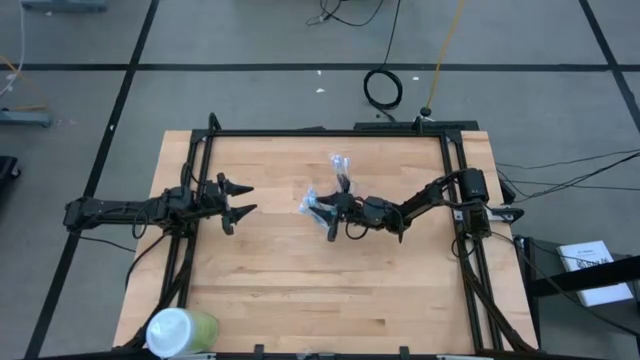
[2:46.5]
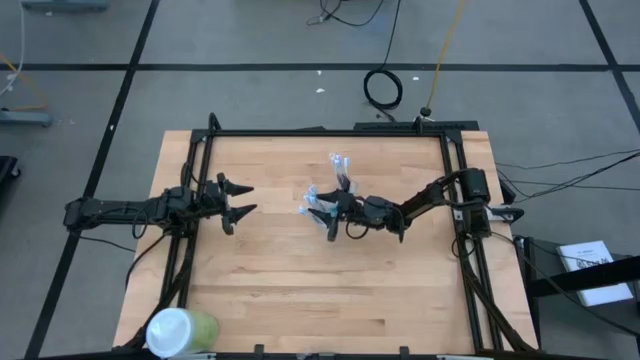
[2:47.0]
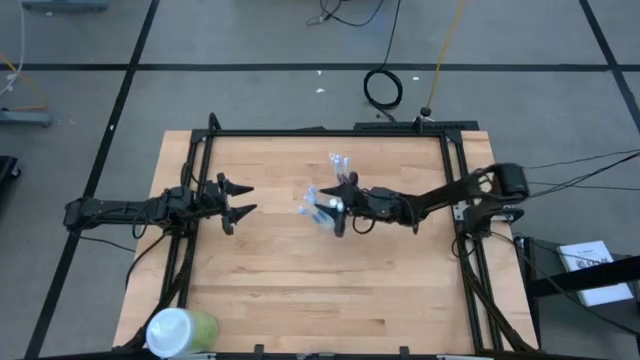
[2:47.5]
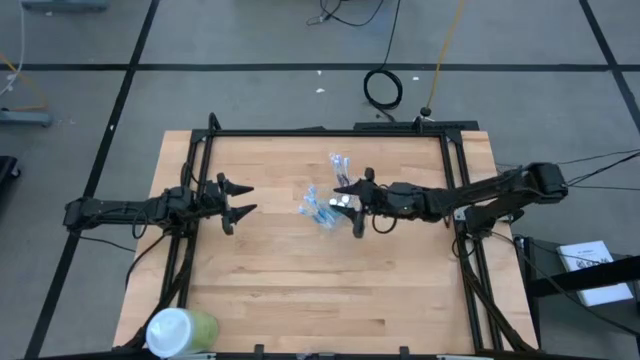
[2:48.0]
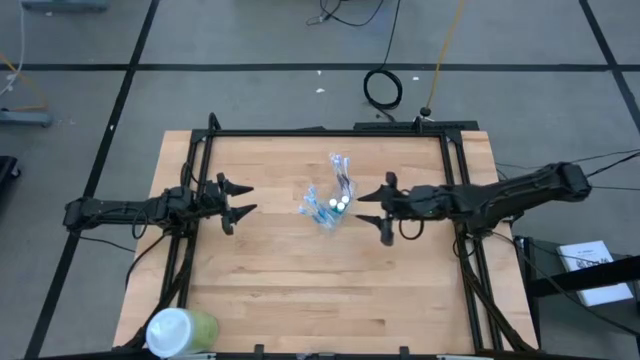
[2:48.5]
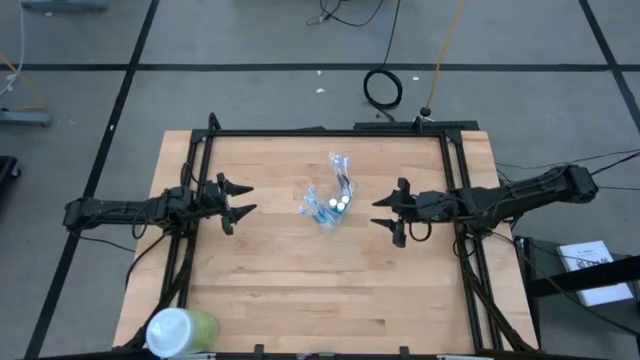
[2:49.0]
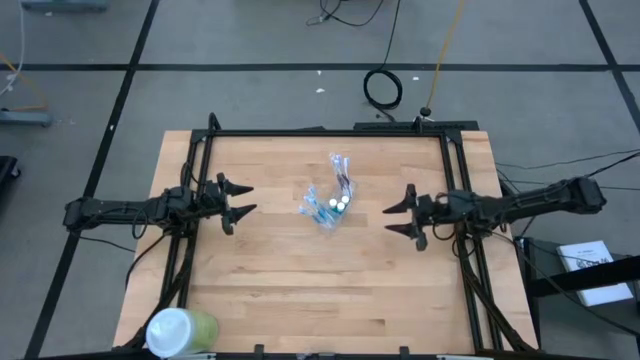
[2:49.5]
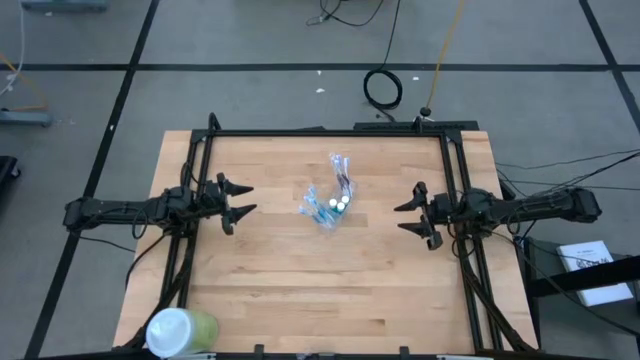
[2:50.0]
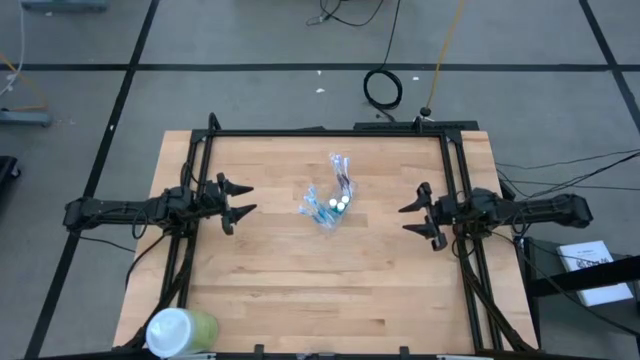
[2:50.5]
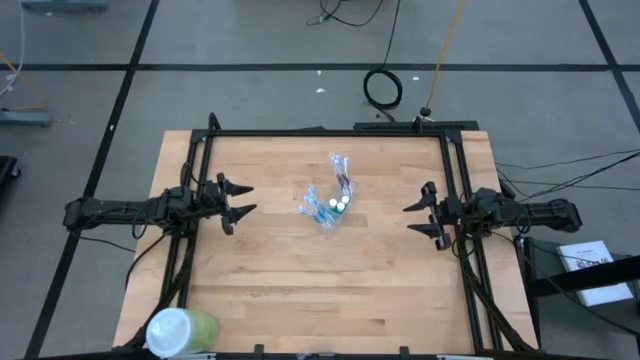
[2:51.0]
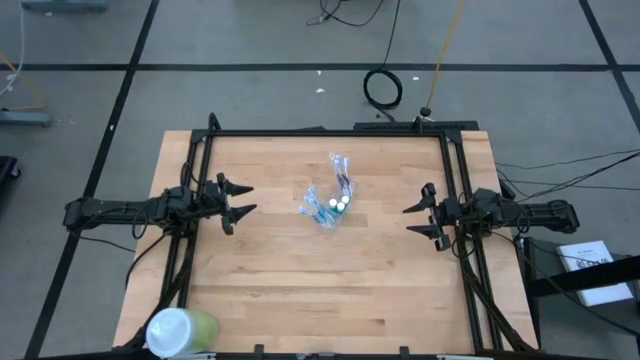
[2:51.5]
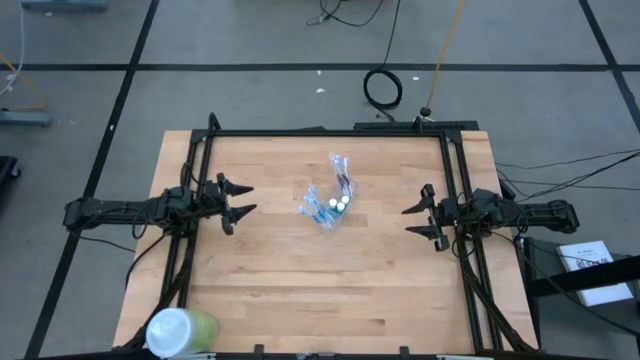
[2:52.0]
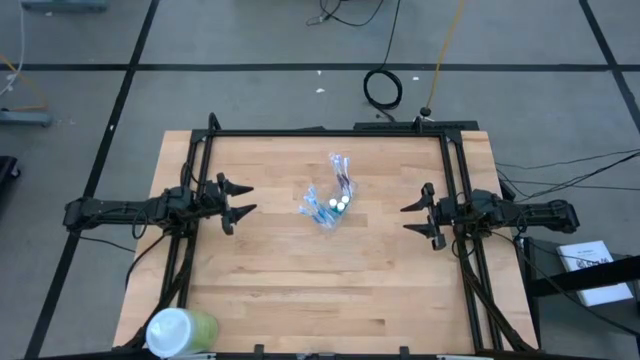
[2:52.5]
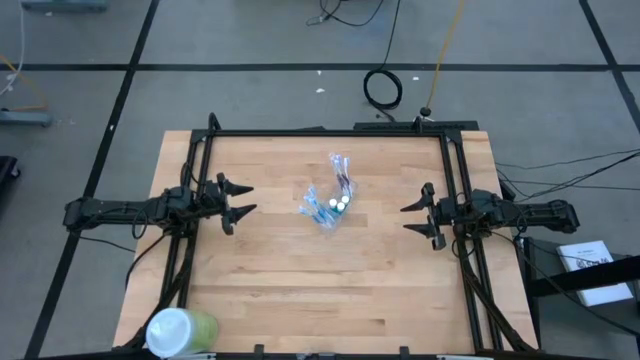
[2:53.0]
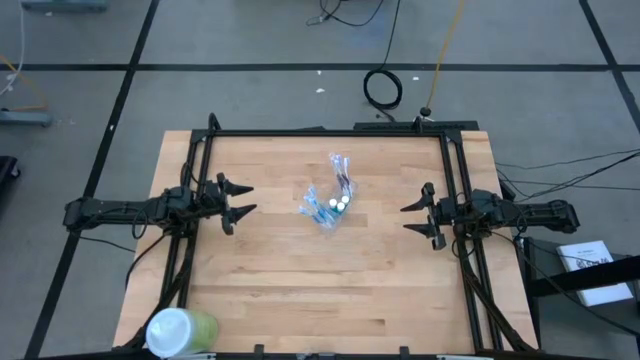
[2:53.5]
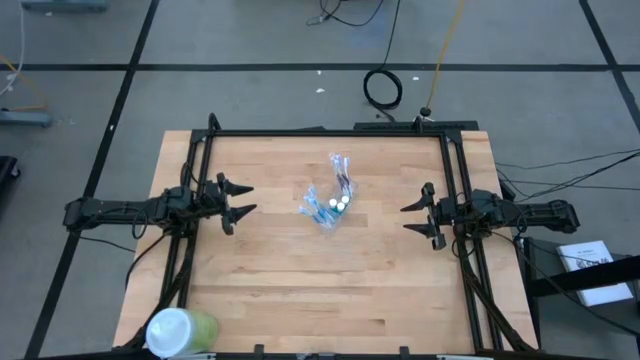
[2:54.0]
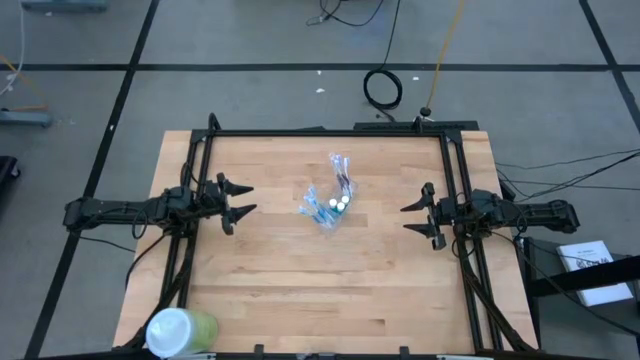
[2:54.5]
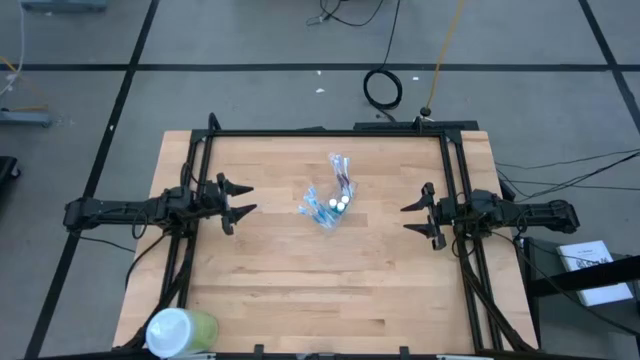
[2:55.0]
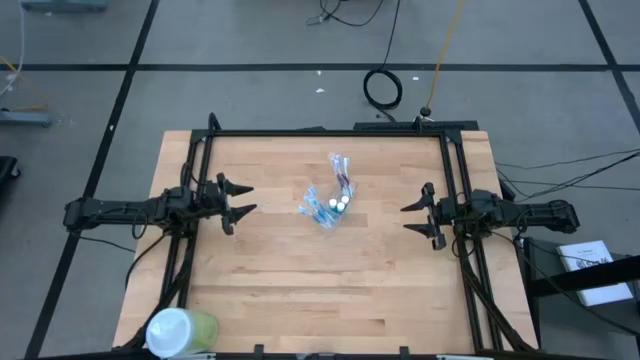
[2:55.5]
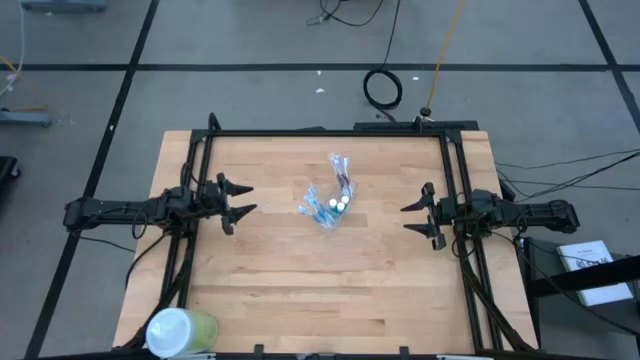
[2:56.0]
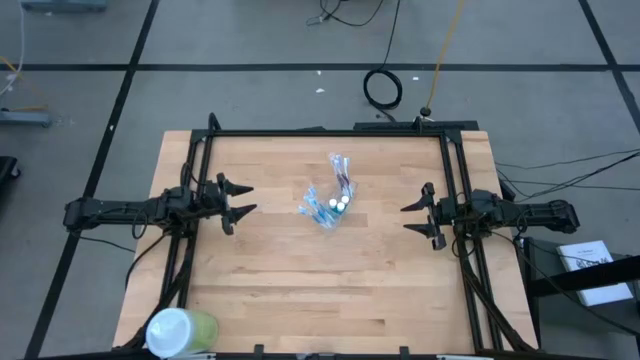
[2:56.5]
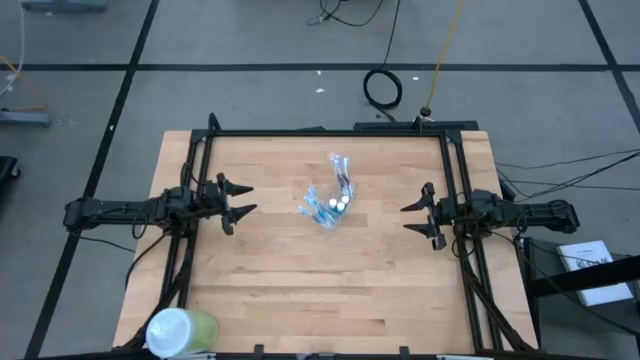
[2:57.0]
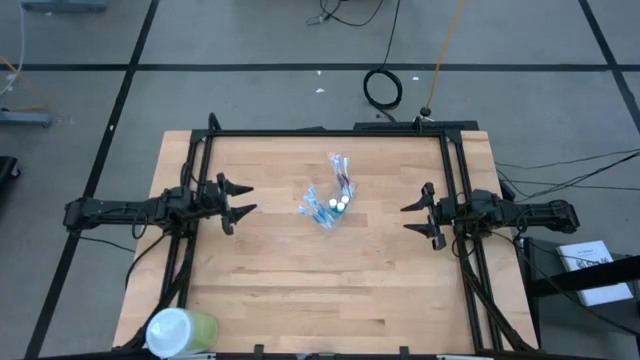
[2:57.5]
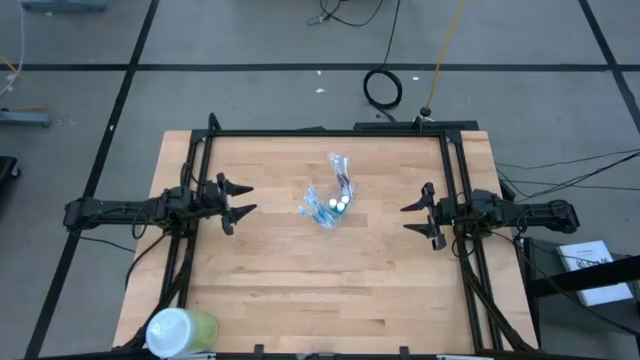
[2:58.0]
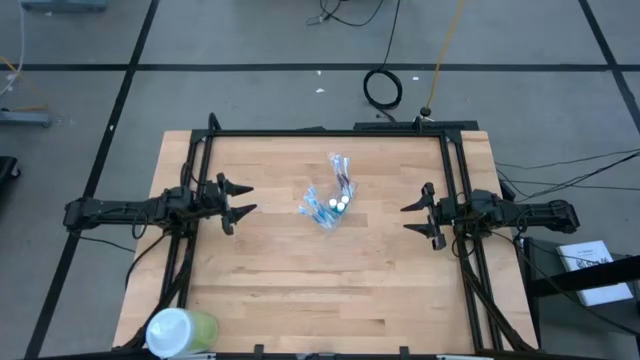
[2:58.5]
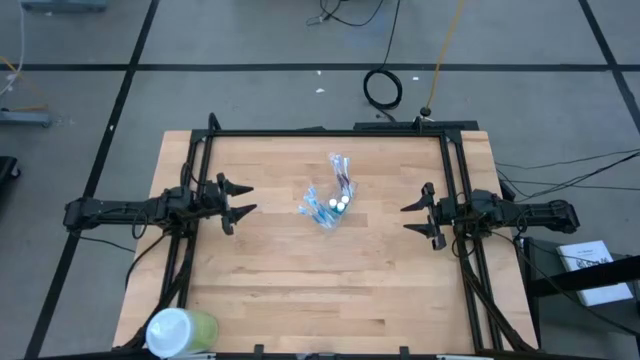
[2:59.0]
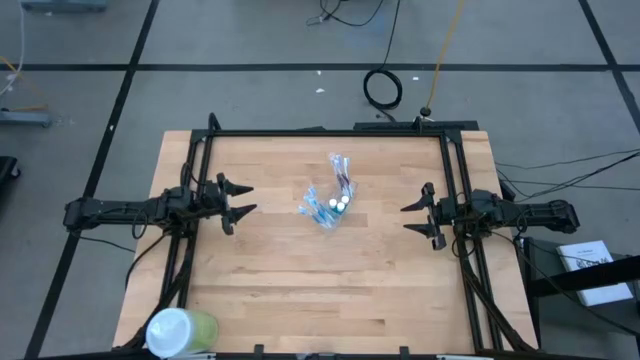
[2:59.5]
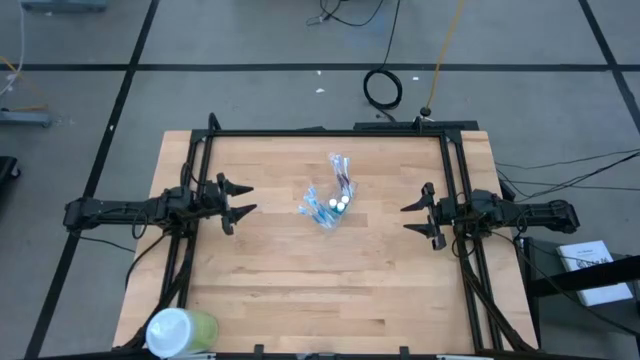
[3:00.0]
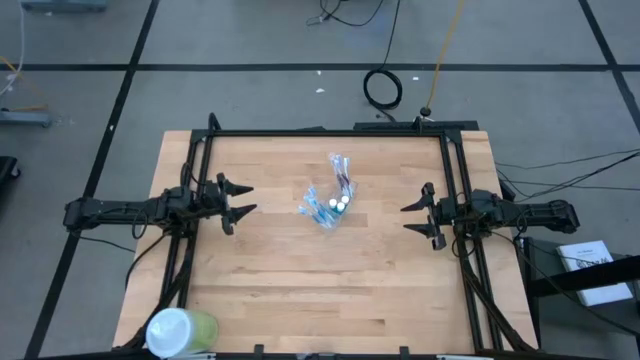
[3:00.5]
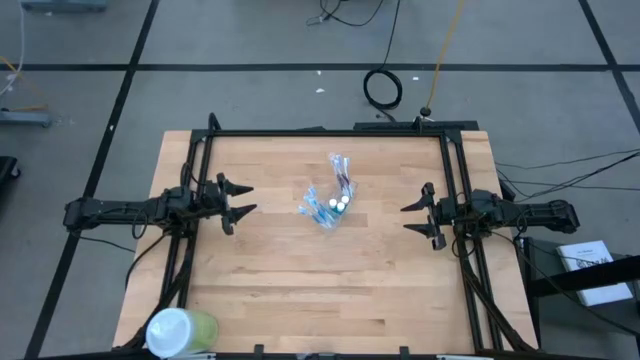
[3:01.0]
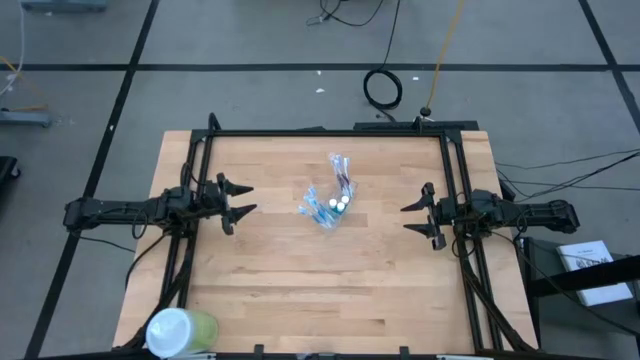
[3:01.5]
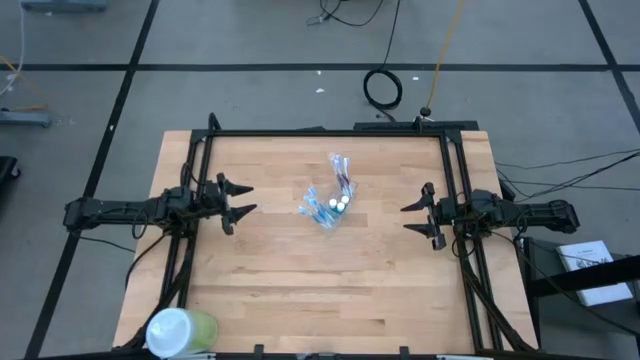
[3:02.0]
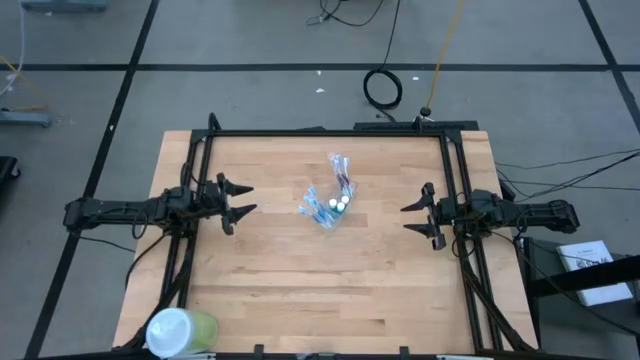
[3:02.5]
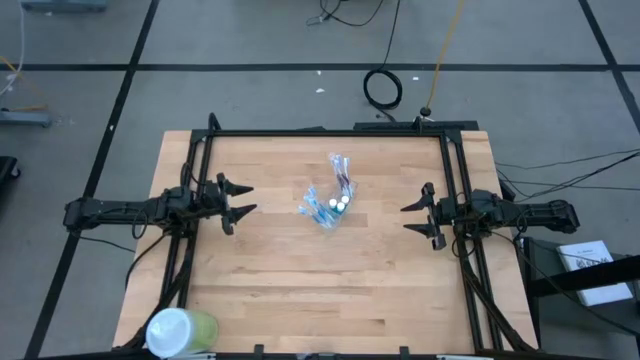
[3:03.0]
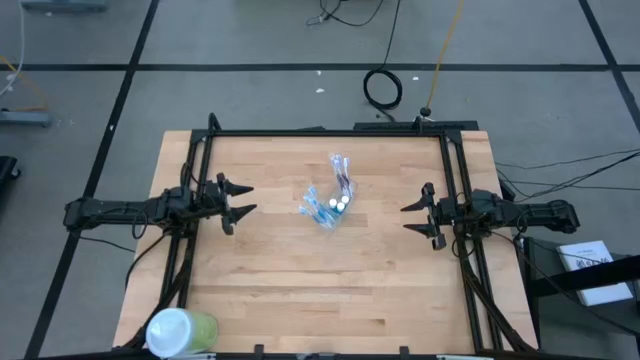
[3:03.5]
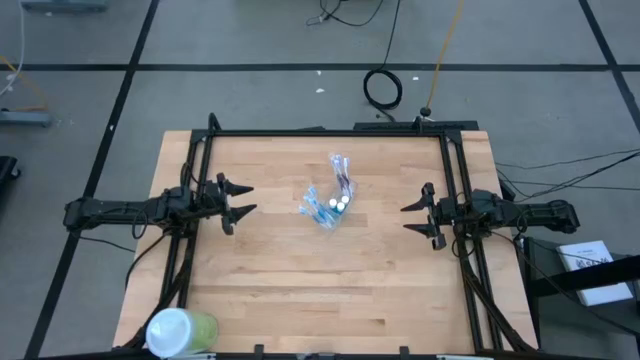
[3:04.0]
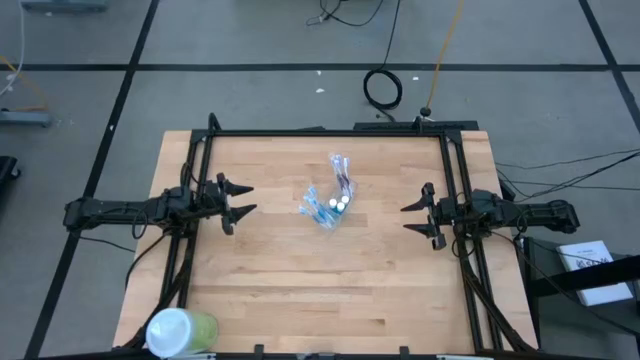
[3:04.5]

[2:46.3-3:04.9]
Task: Pick & Place toothbrushing station
Return to Home Position

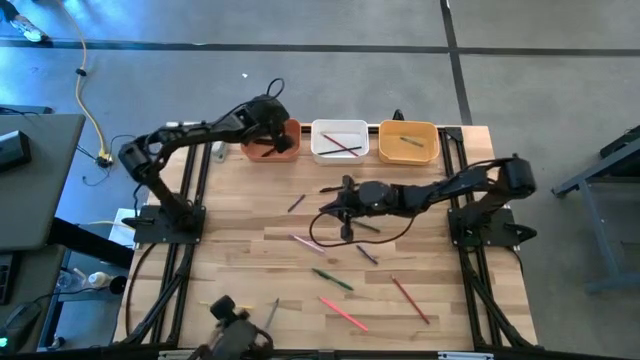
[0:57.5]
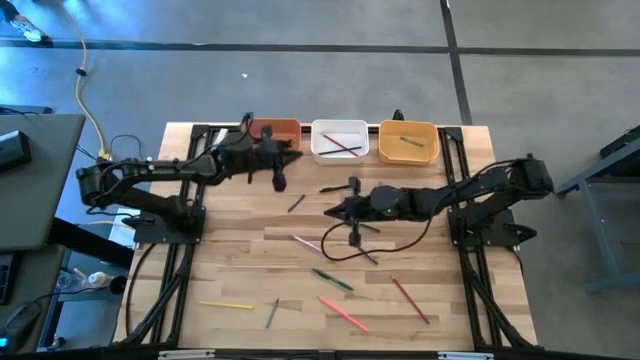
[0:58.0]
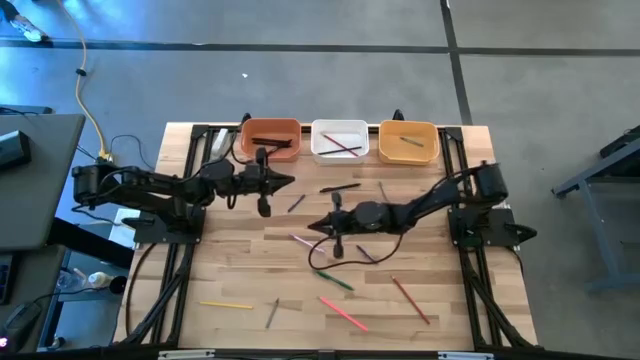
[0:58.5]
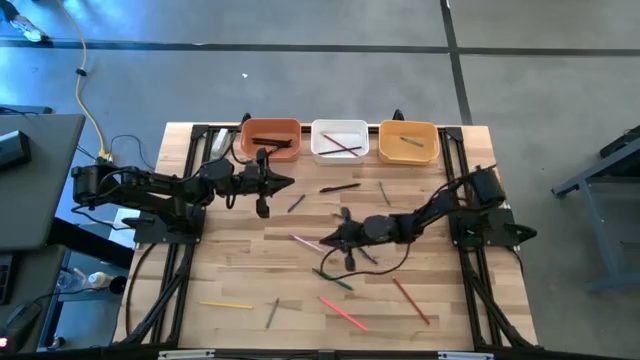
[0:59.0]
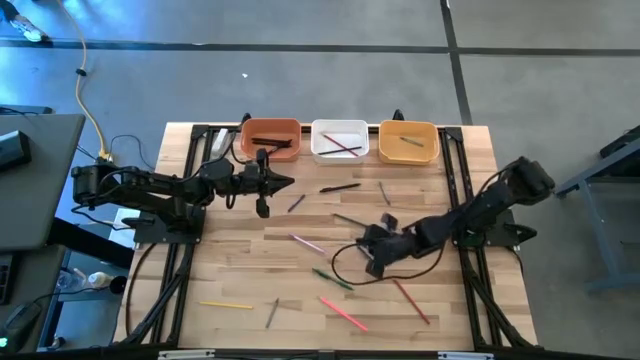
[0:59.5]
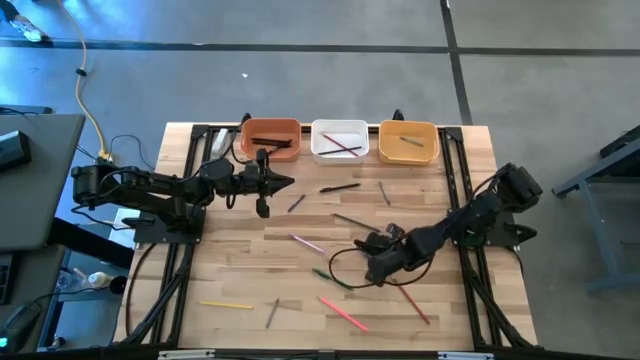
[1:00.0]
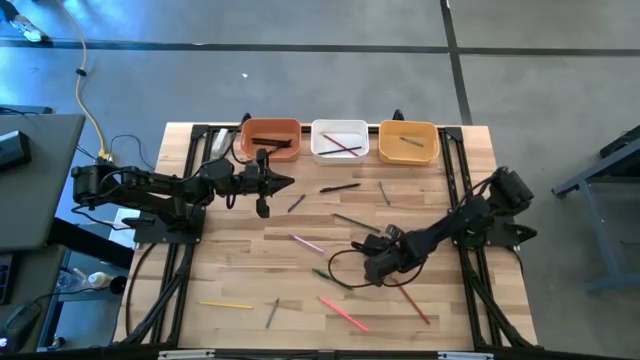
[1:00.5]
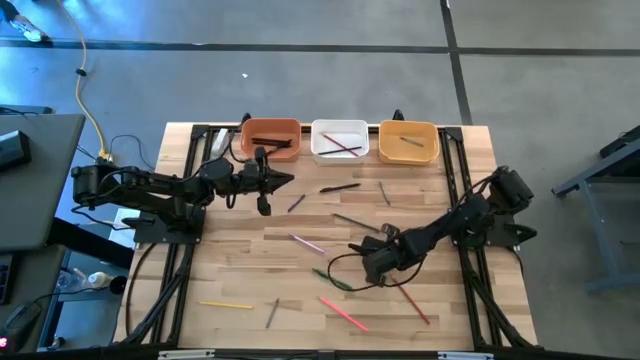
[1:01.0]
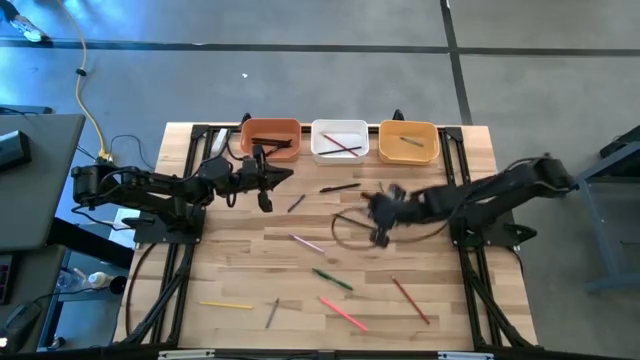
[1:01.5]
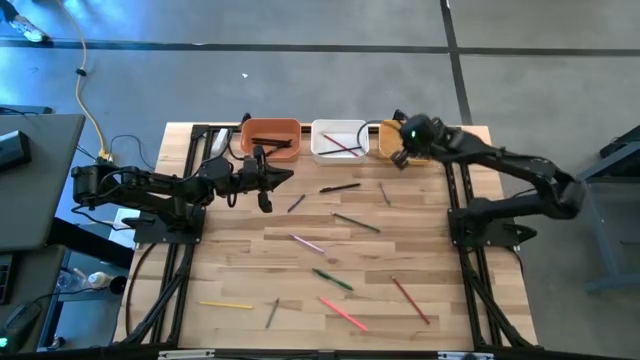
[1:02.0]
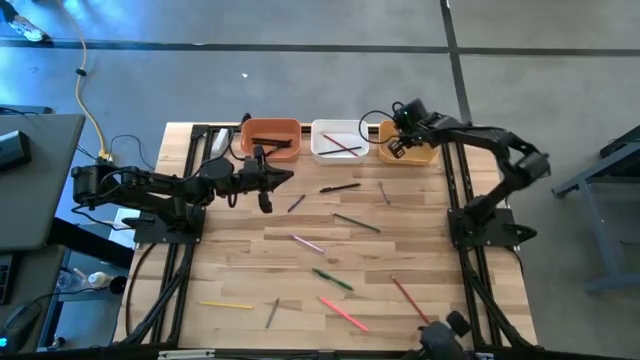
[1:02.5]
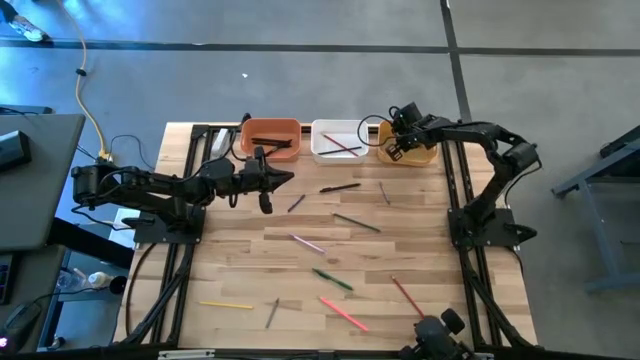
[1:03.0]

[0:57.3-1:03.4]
Task: Sort crayons/erasers/pens/pencils in bins
Put the bottom blue crayon into the yellow bin
